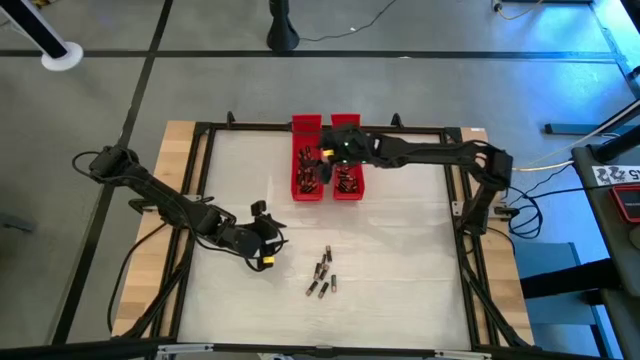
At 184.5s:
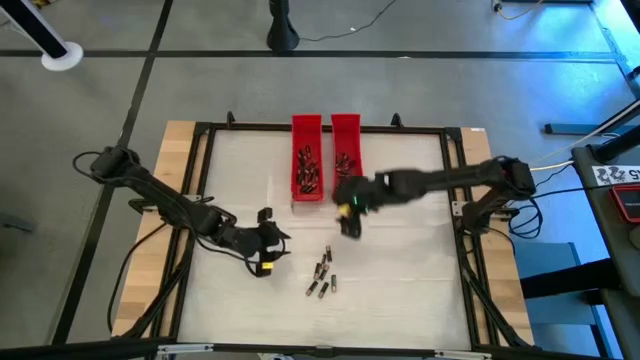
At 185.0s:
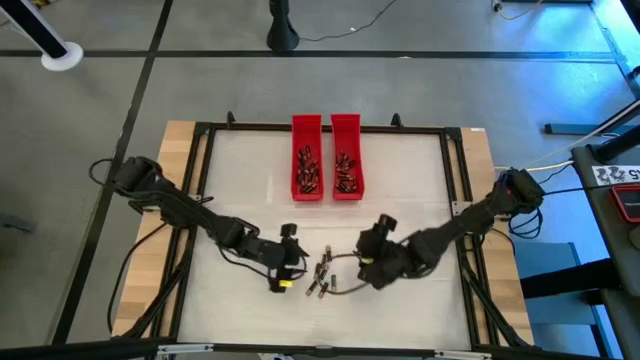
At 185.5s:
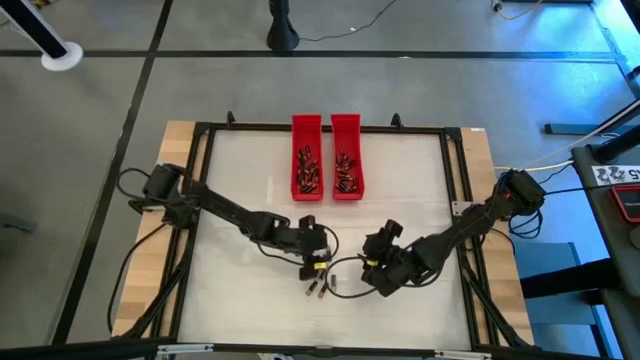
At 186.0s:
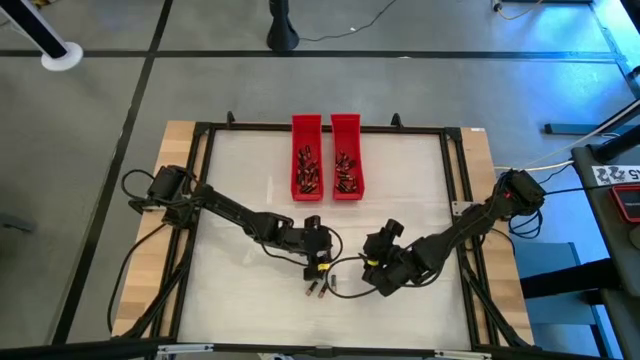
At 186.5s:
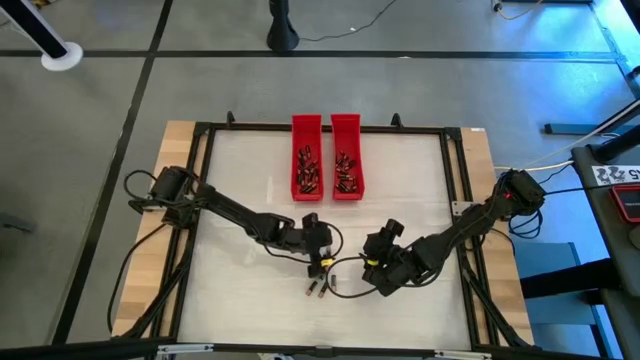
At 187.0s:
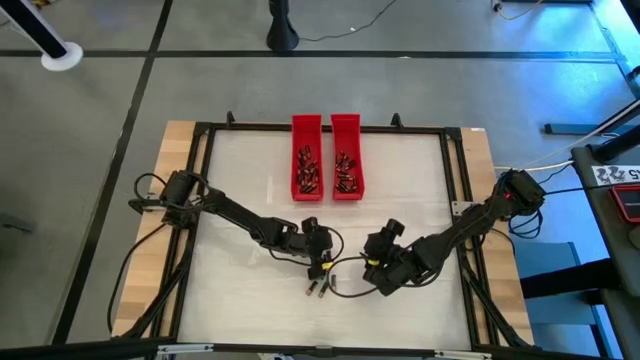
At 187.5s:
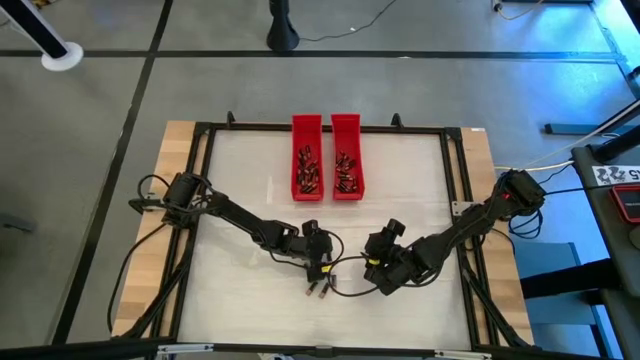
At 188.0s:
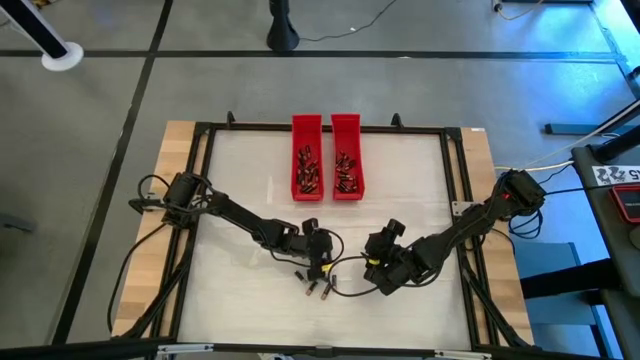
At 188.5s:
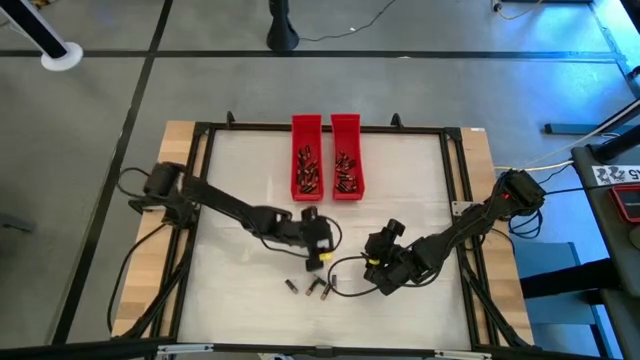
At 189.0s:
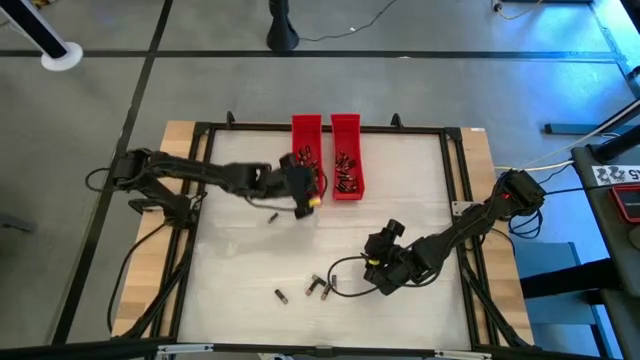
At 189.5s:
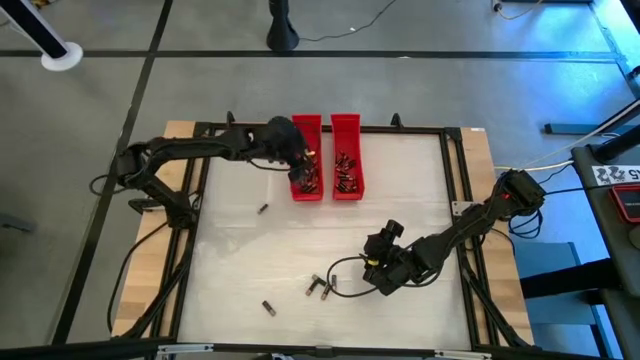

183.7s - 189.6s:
Task: Sort batteries
Put the large black battery into the left red bin

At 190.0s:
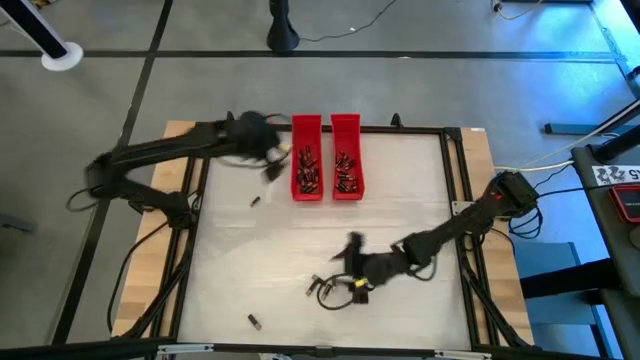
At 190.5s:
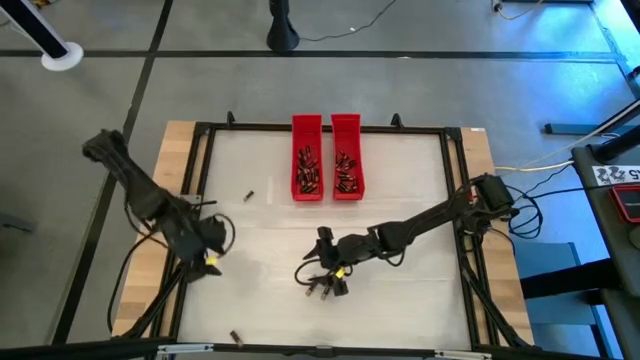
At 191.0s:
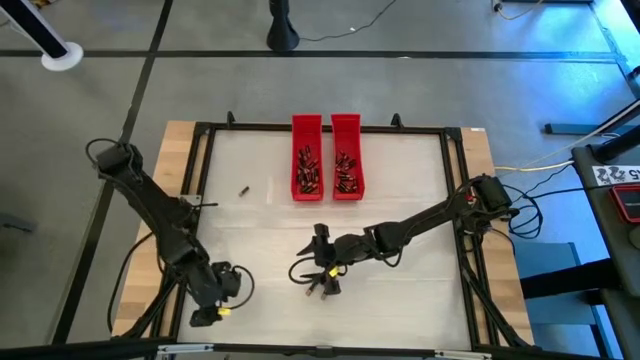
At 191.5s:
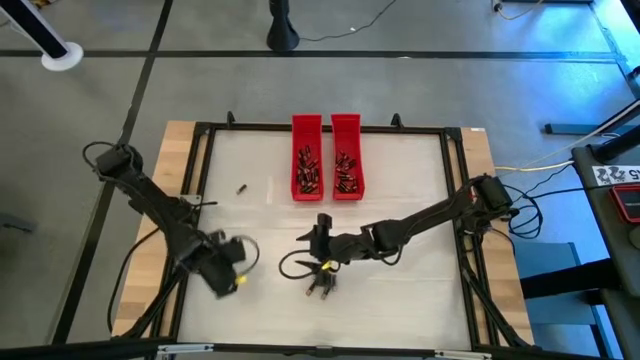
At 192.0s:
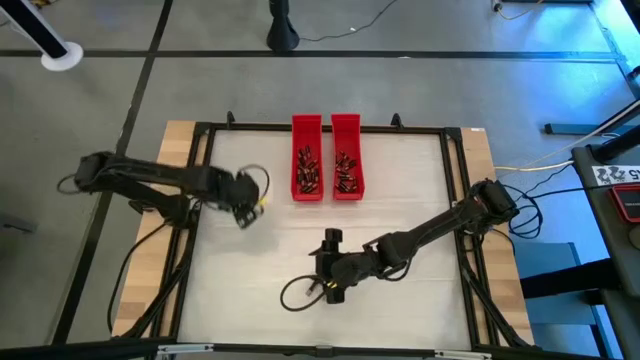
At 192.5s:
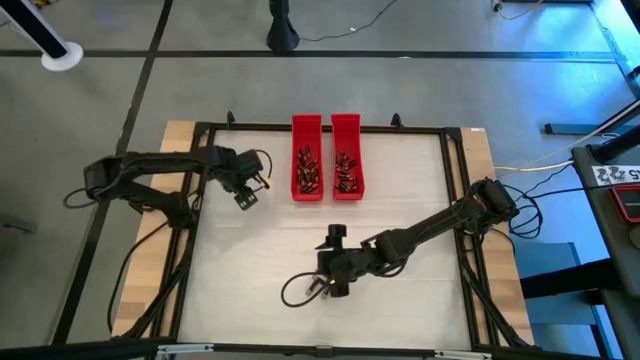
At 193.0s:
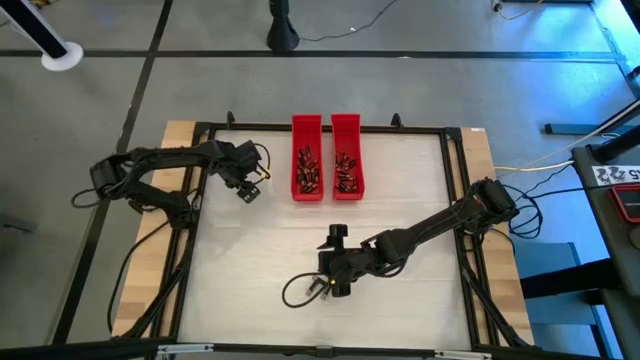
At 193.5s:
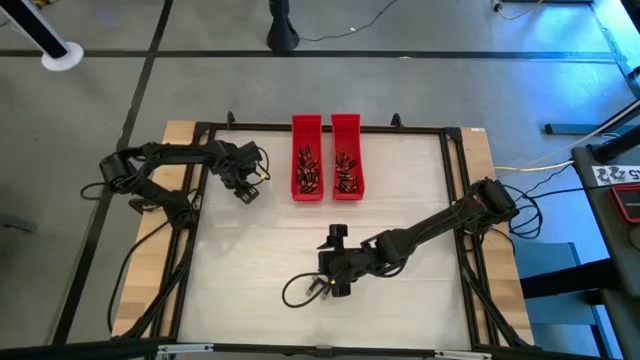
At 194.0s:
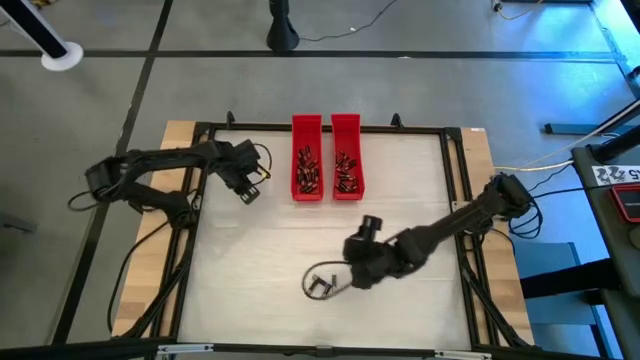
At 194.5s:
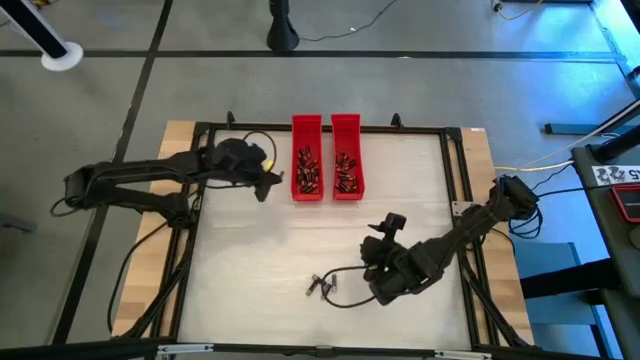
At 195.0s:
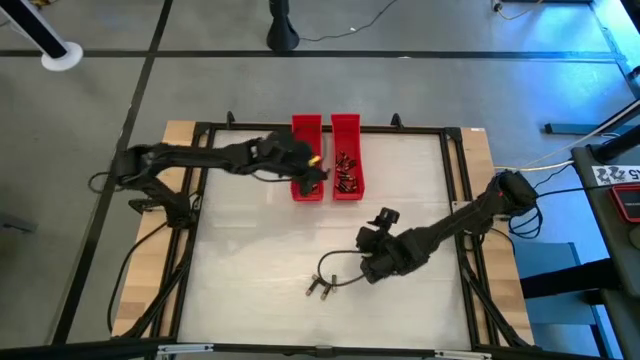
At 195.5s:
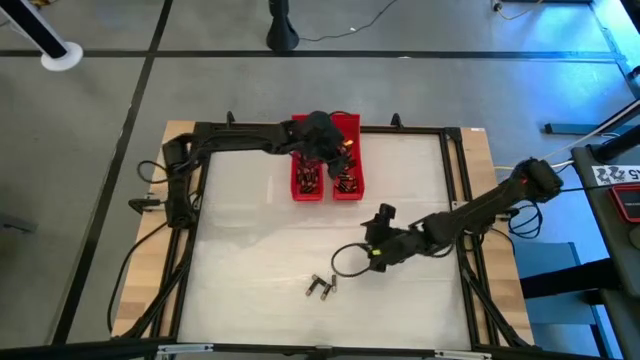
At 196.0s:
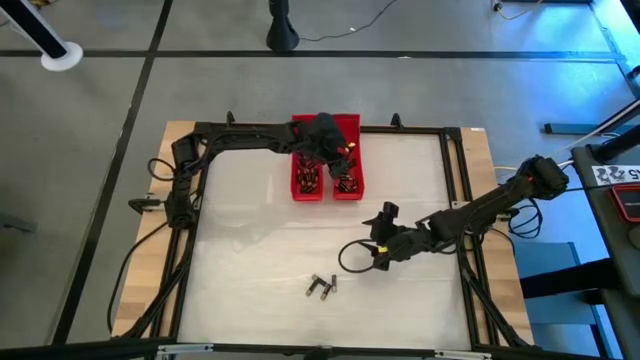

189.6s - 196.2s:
Put the small black battery into the right red bin

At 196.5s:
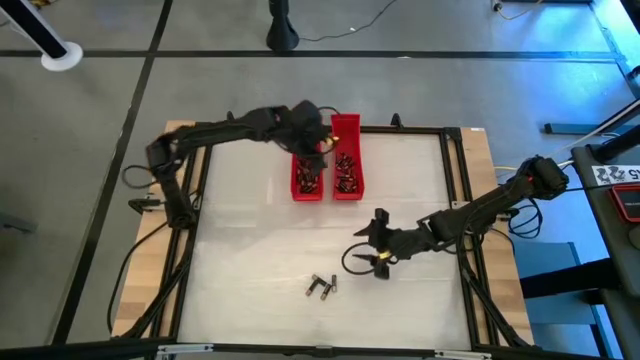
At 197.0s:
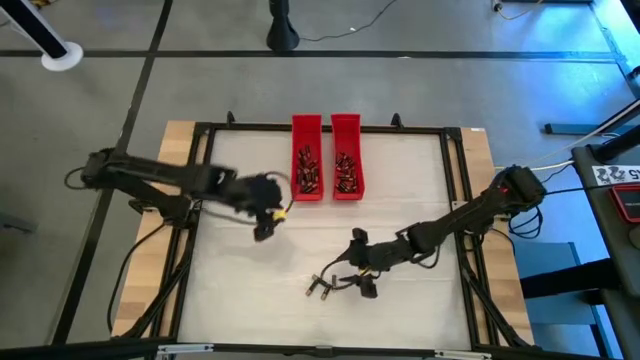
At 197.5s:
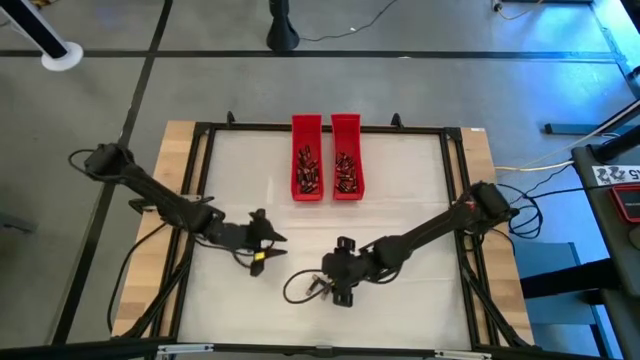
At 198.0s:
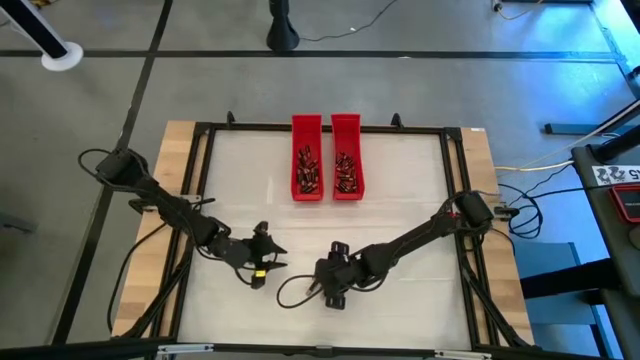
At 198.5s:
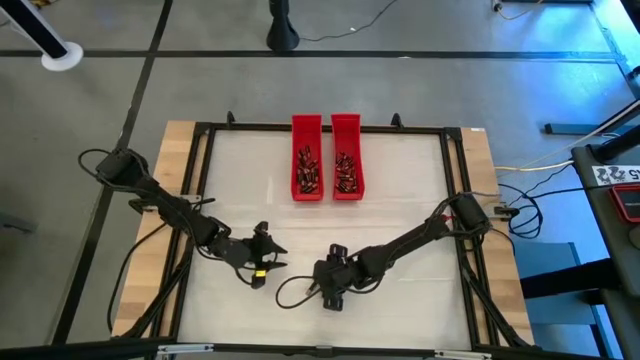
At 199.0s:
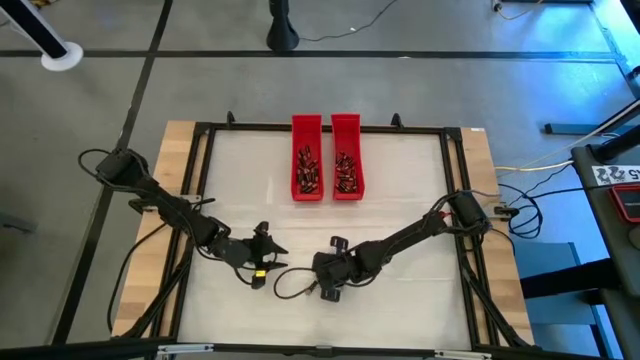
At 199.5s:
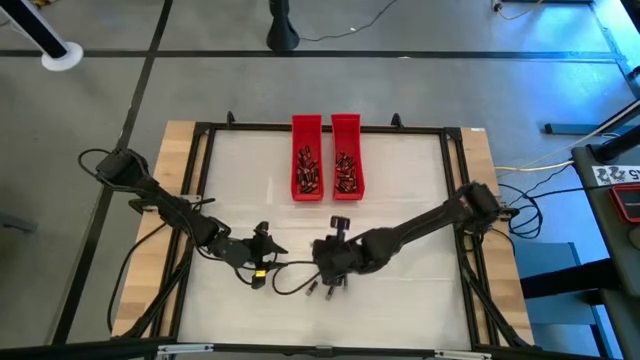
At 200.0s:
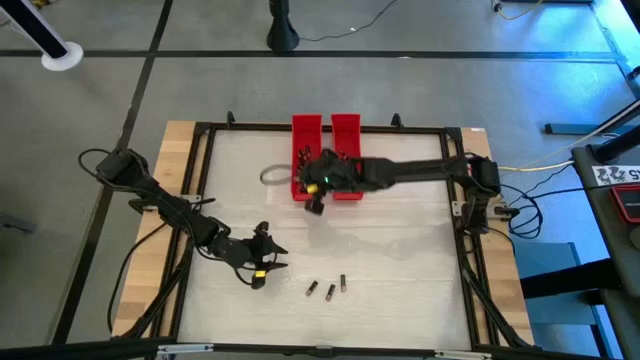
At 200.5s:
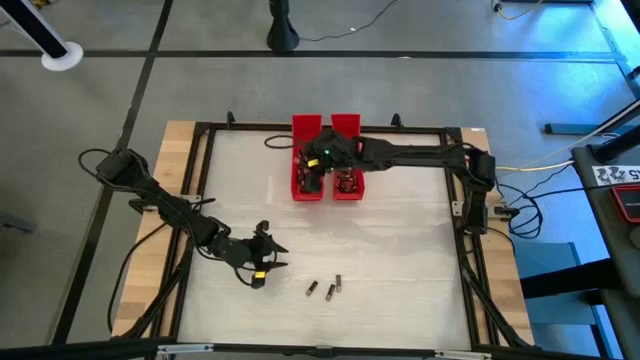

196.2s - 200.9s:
Put the large black battery into the left red bin

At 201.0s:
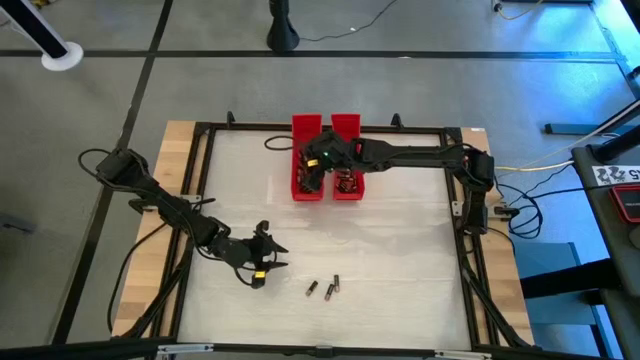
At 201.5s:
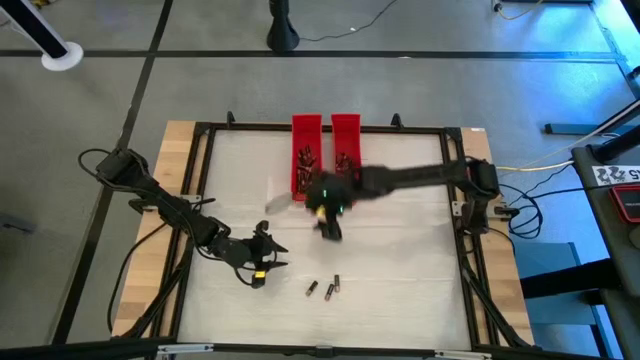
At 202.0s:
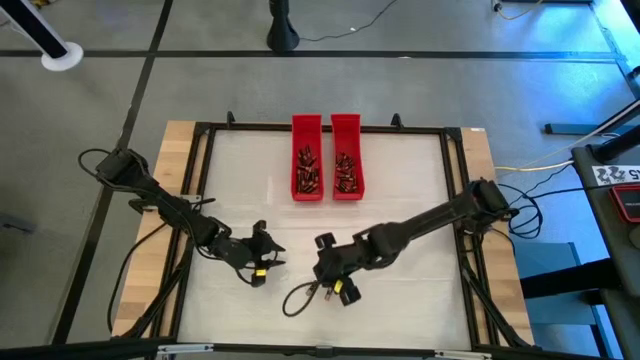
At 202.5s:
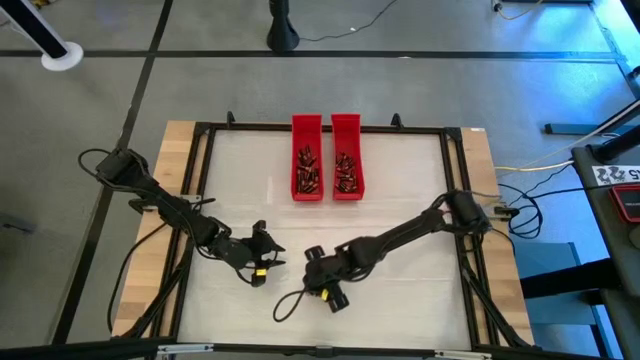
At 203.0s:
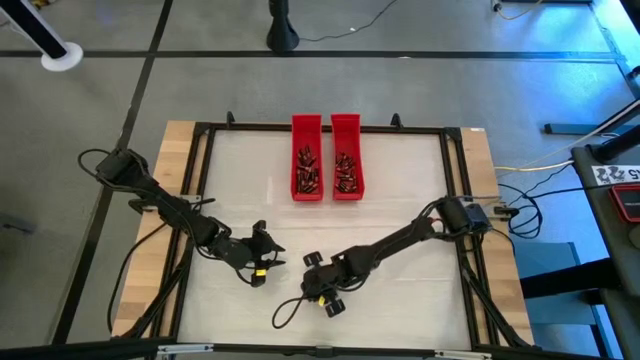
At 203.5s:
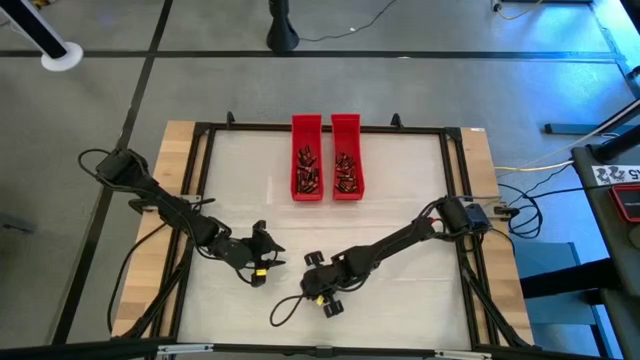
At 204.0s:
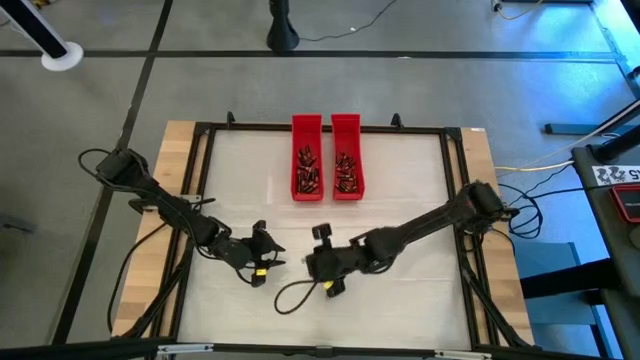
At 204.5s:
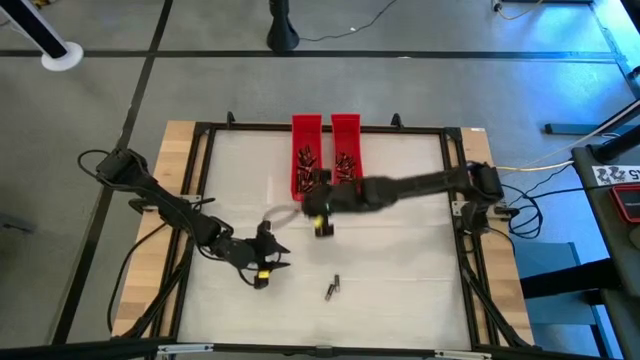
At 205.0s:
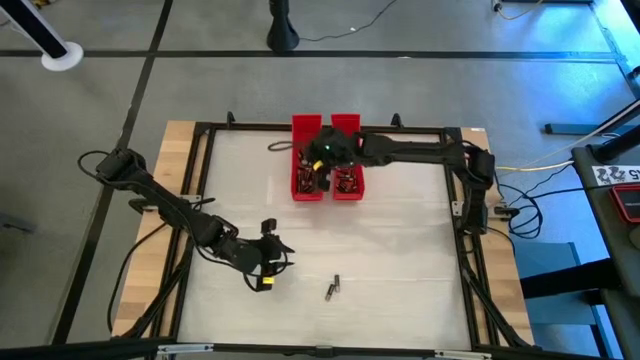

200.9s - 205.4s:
Put the large black battery into the left red bin
